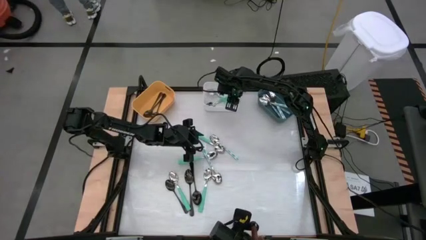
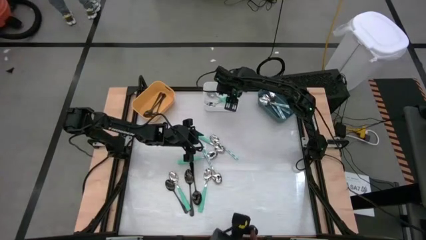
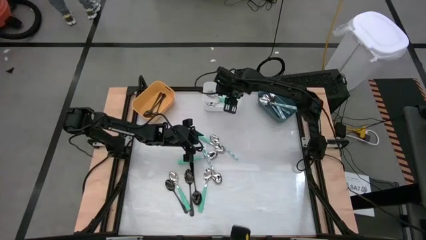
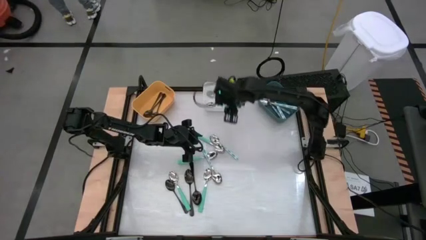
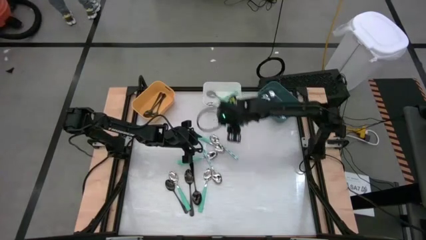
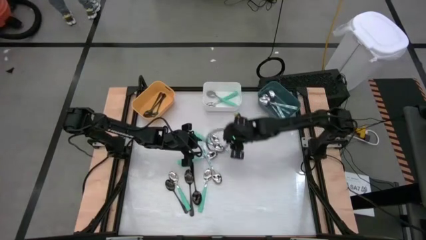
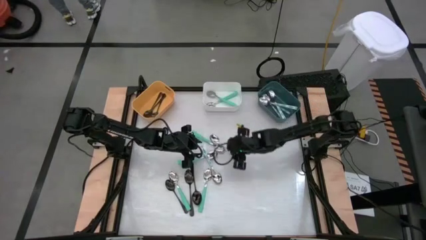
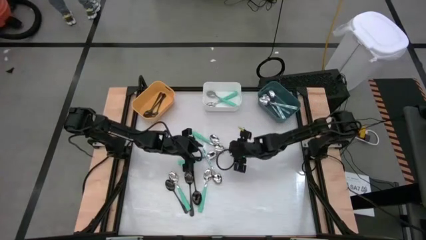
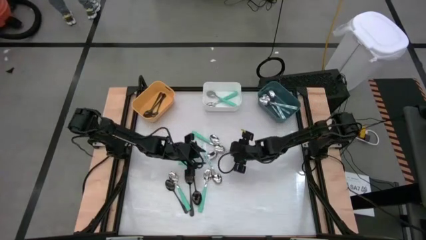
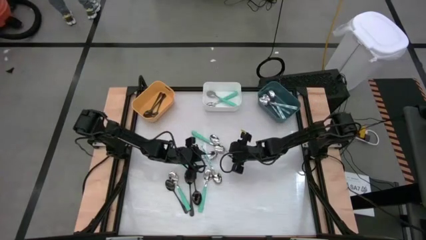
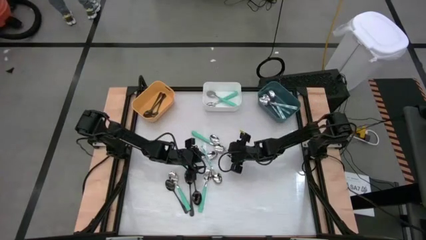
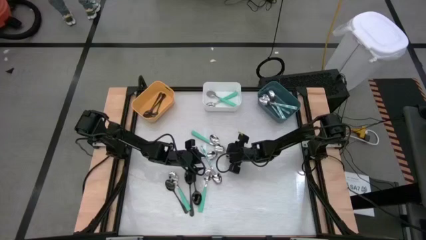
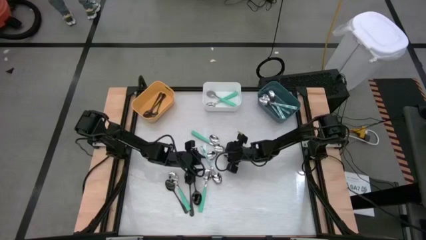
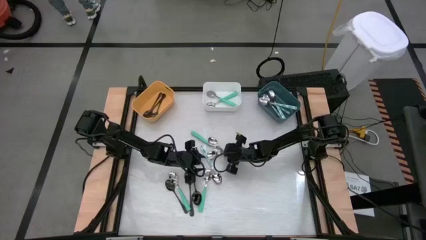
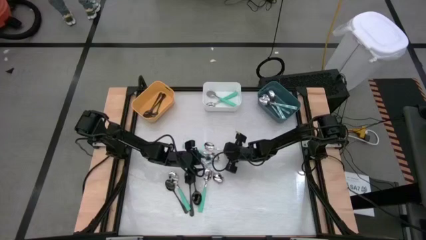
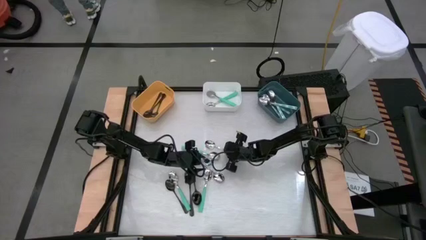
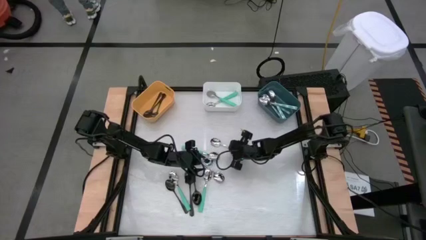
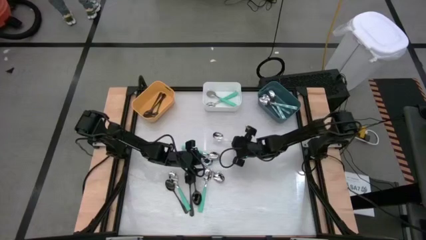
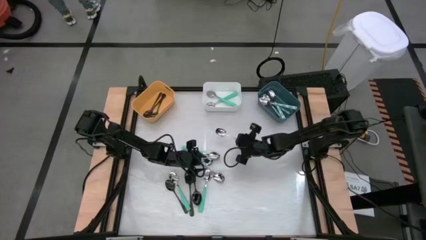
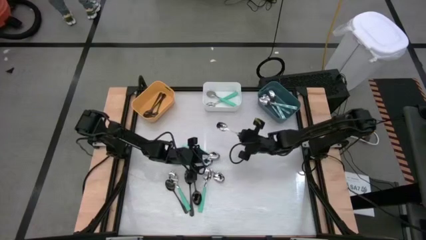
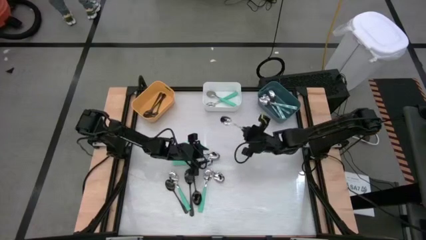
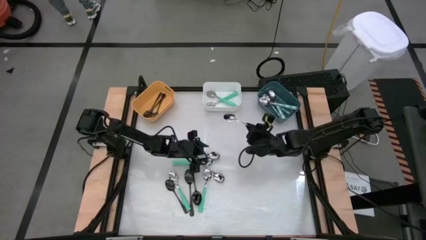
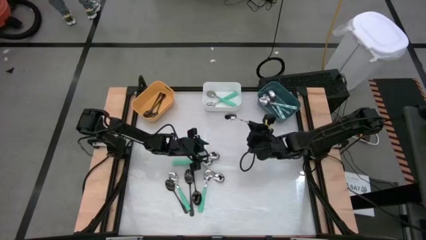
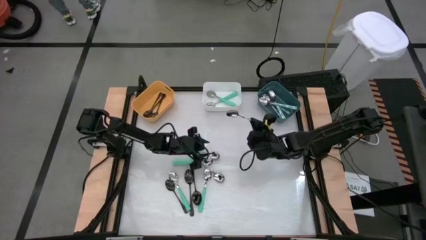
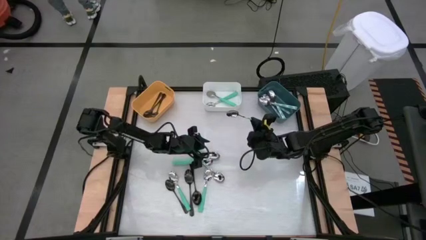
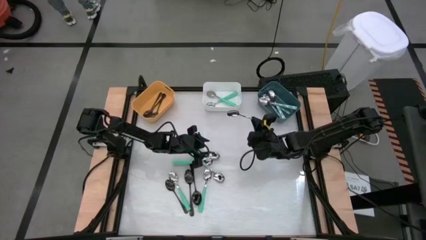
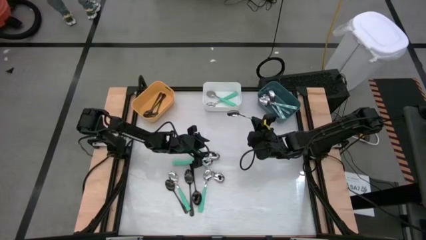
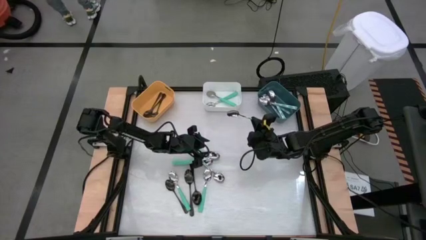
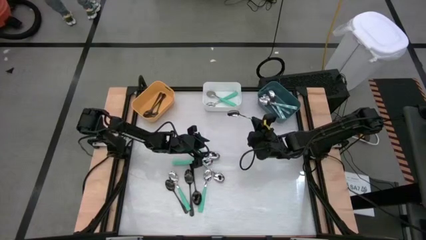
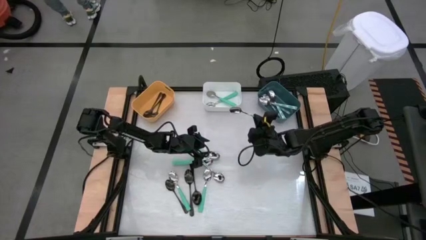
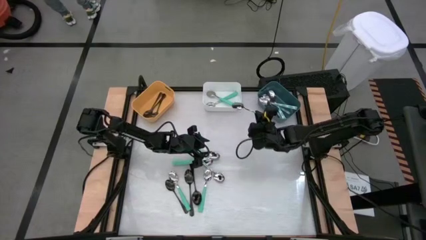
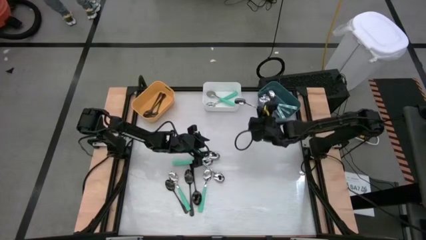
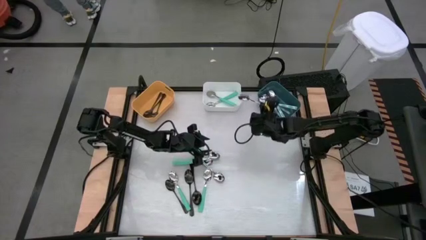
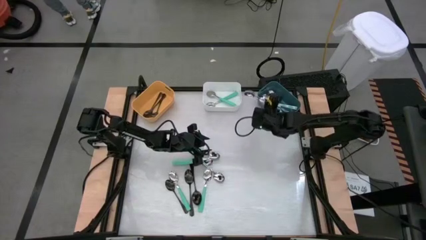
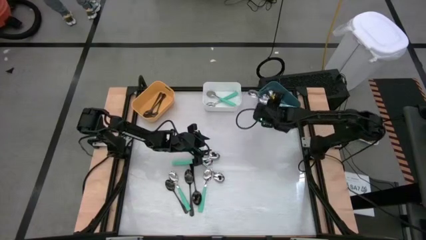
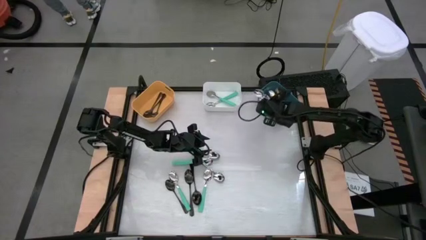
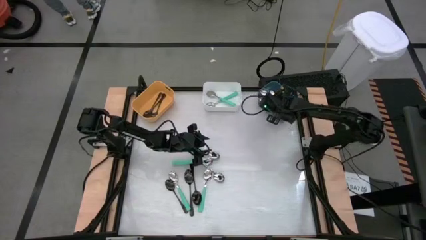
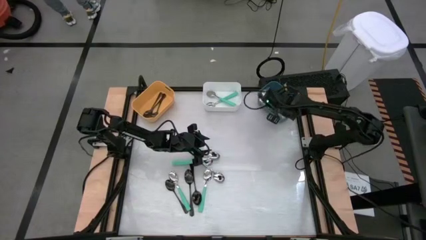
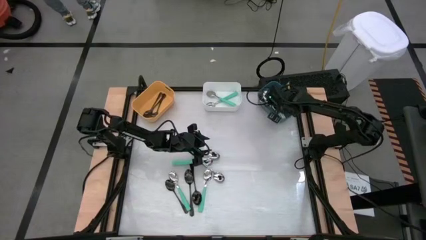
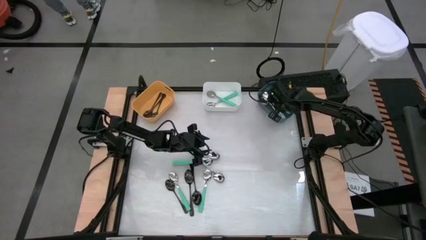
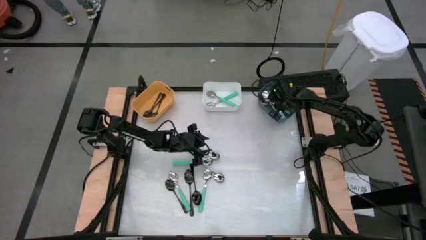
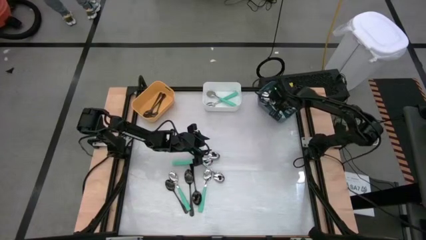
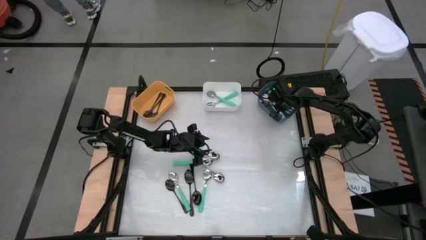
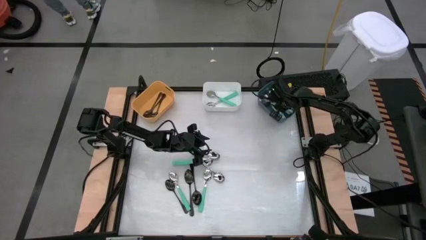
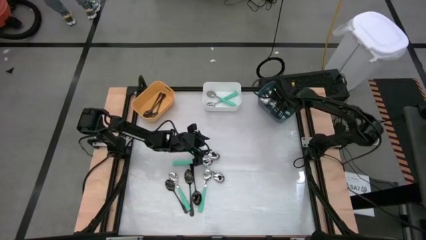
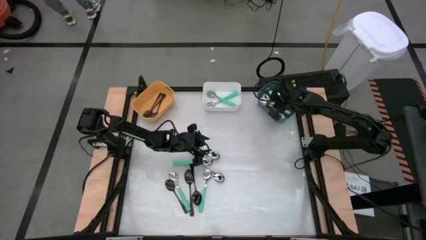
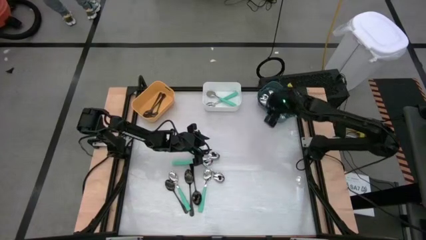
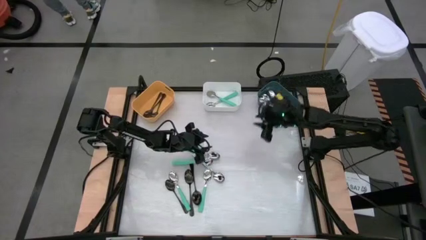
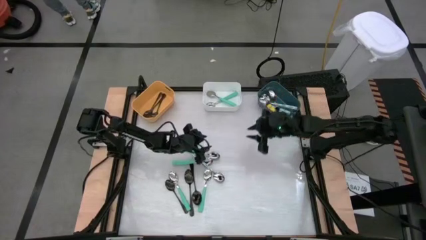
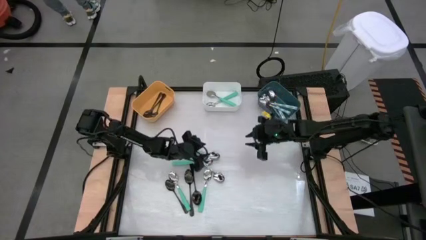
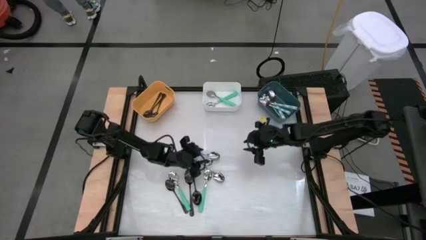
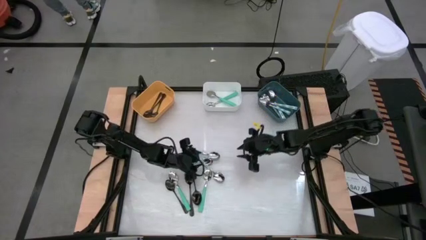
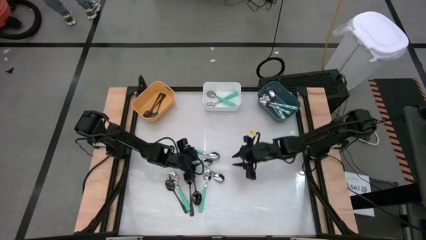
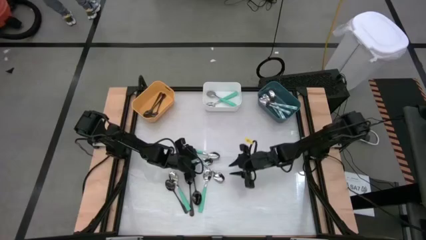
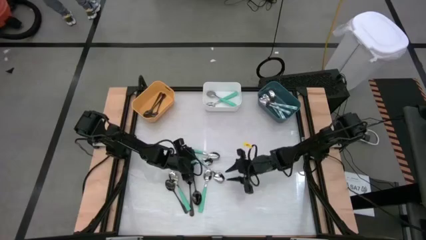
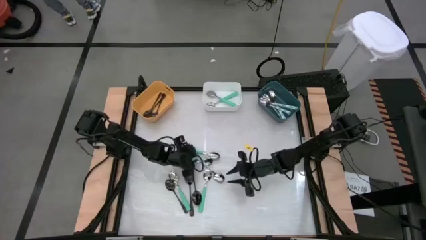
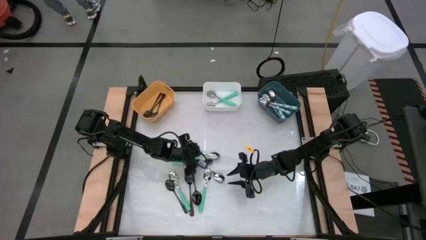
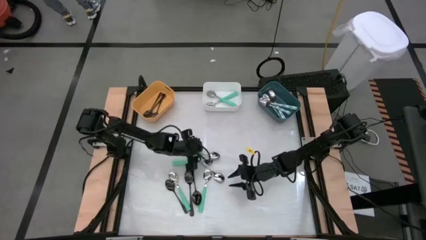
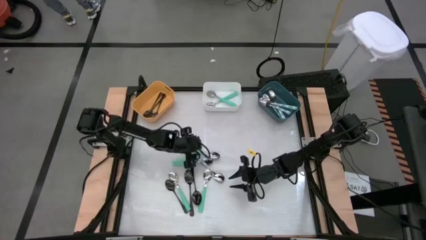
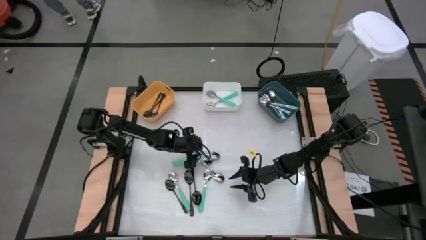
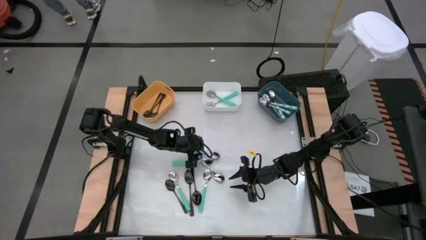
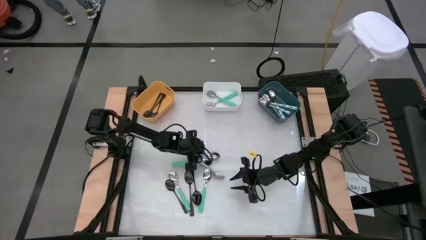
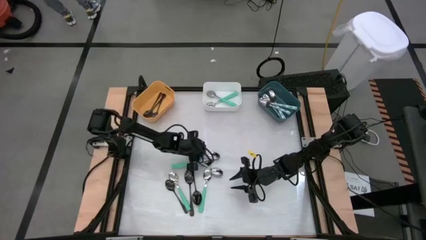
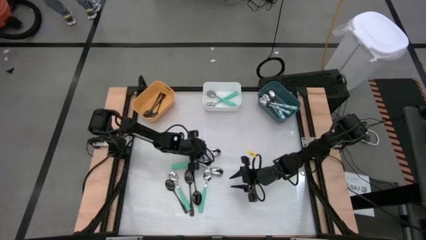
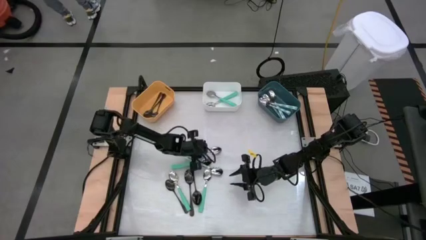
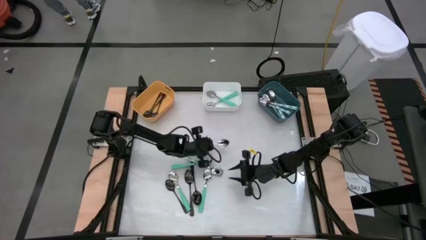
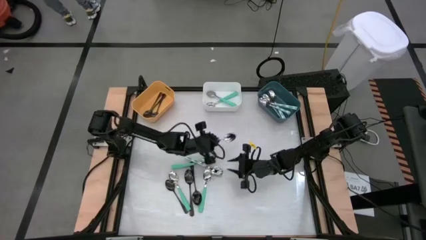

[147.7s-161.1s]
Task: Sort silverware by color (type)
Put the blue patterned spoon into the blue bin

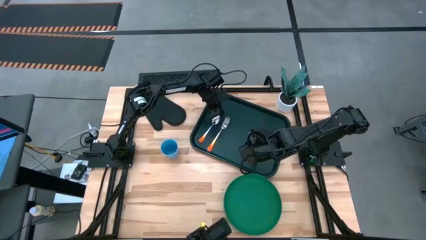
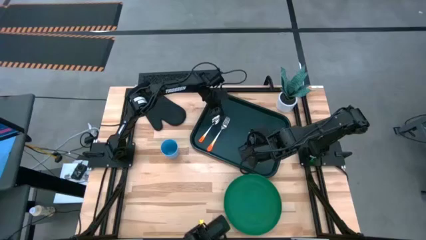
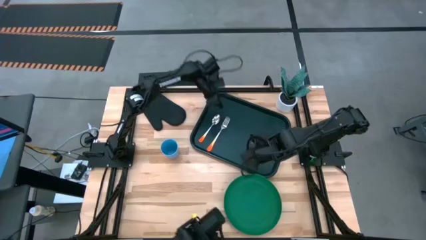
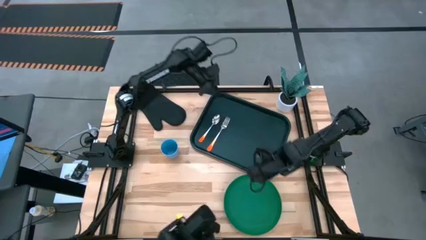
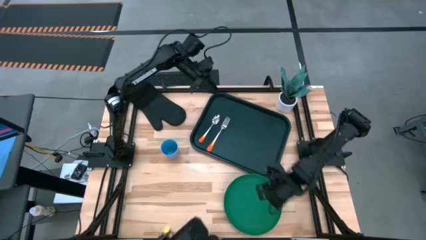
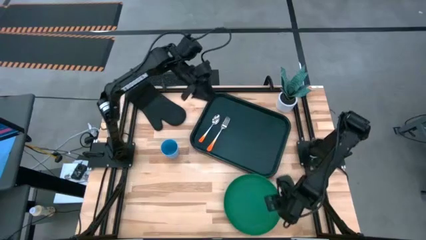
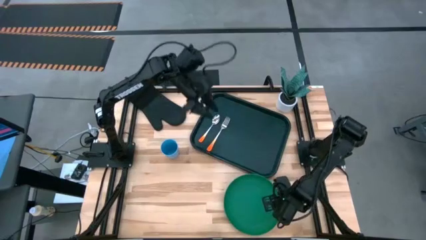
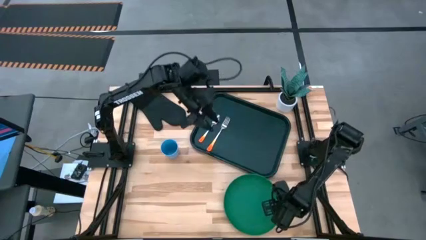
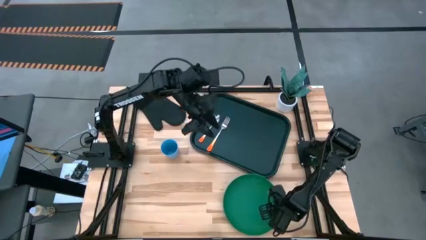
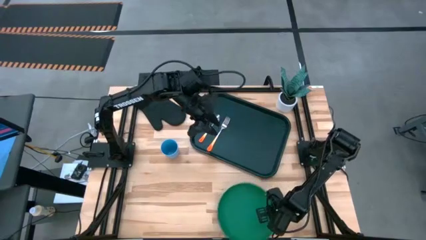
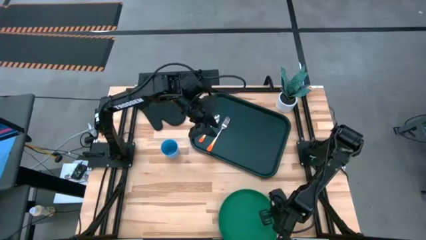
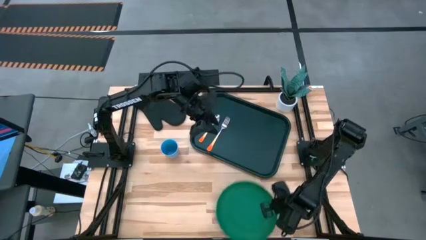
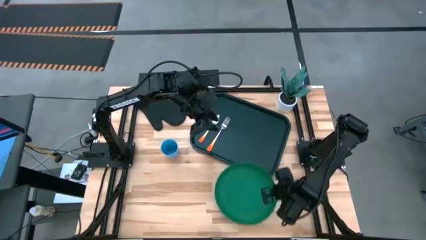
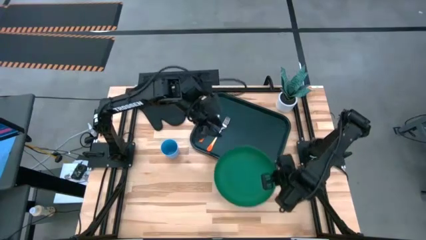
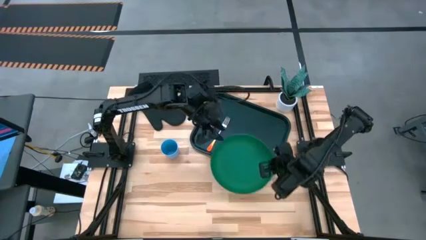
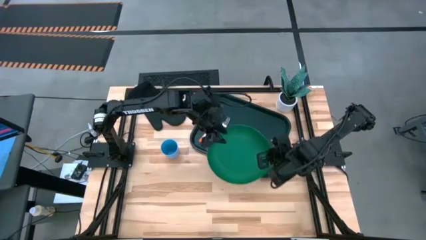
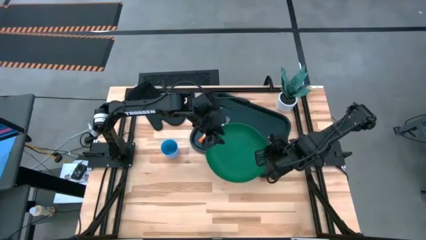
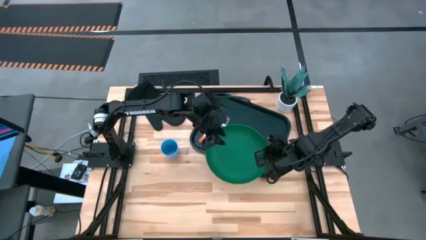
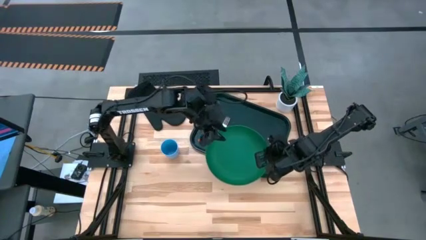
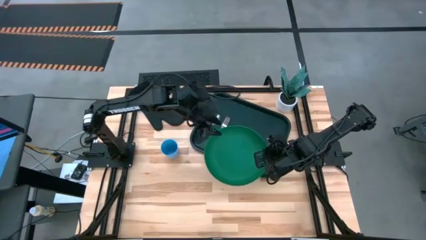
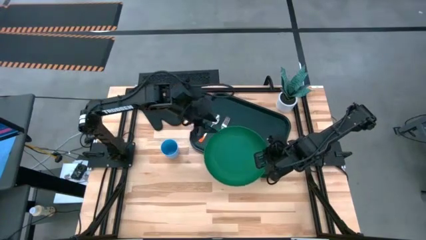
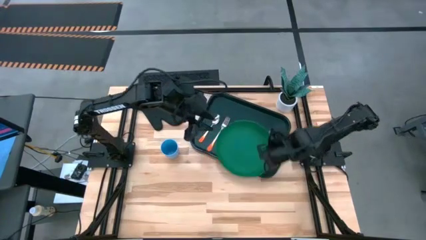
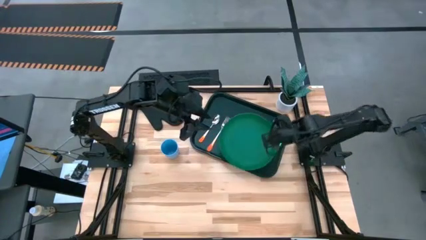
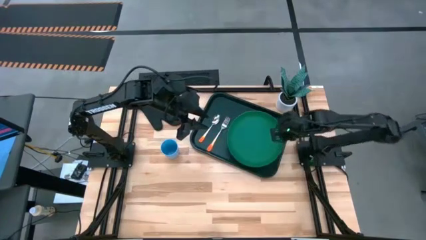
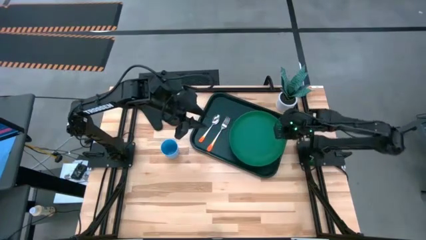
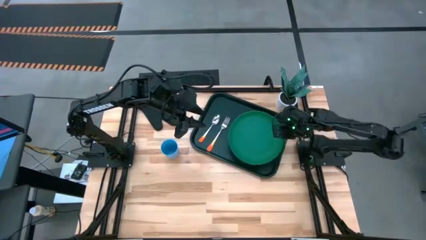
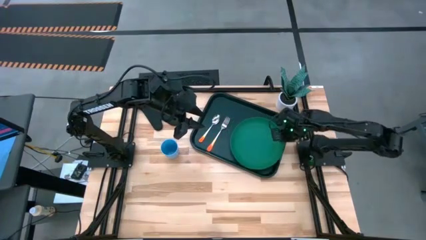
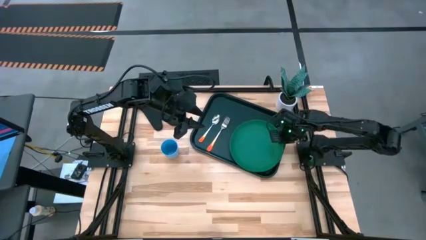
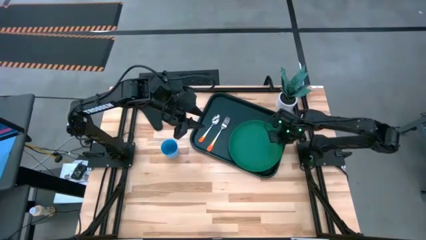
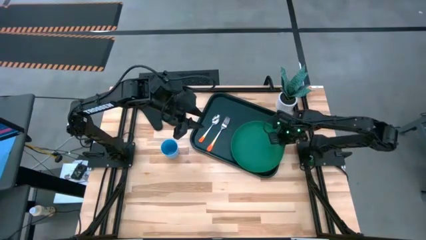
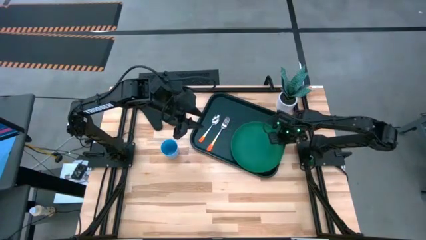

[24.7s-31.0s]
Task: Pick and place plate/cup/fork/spoon on tray
Put the green plate to the right of the orange fork and orange spoon on the black serving tray
